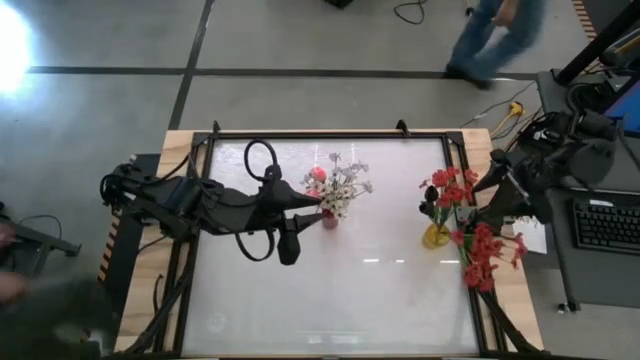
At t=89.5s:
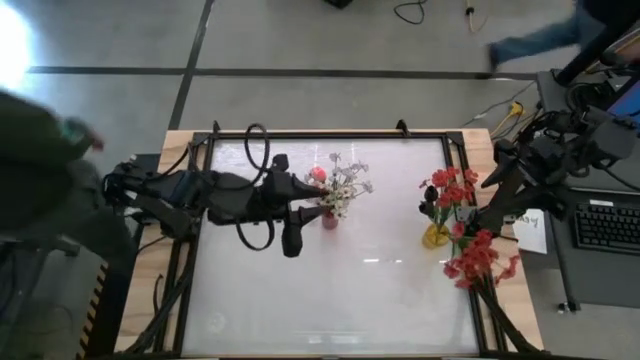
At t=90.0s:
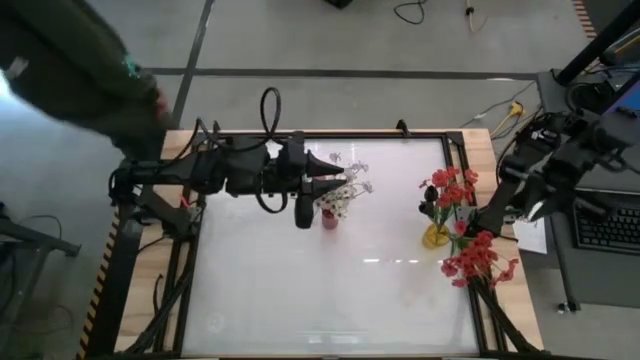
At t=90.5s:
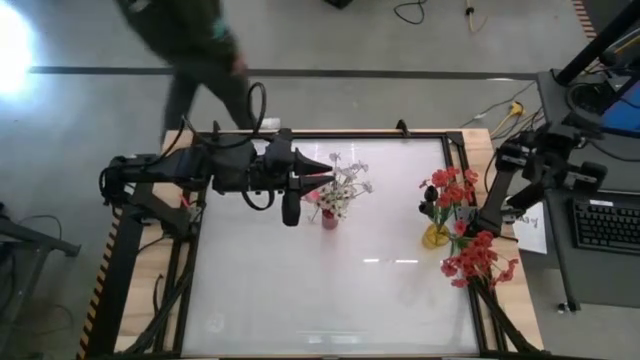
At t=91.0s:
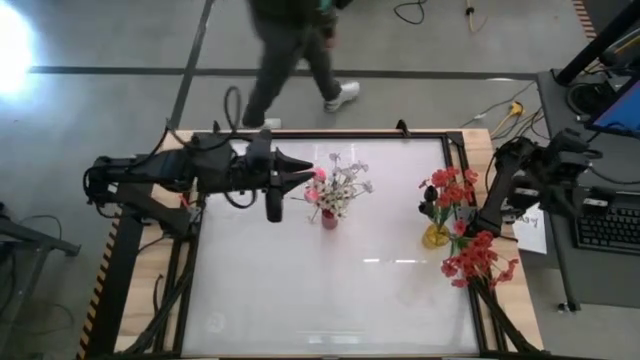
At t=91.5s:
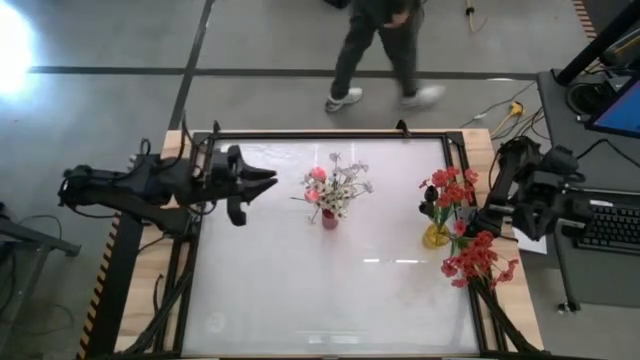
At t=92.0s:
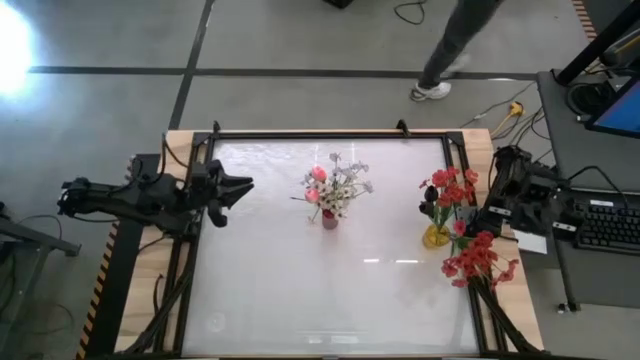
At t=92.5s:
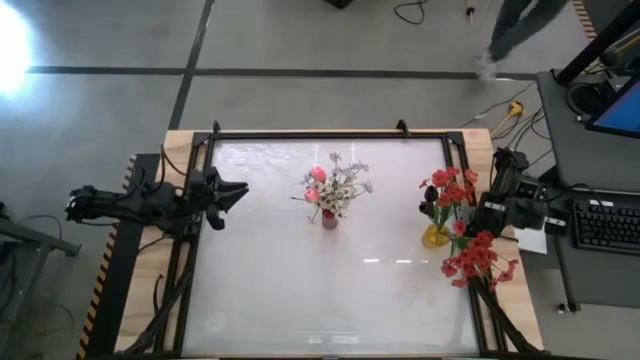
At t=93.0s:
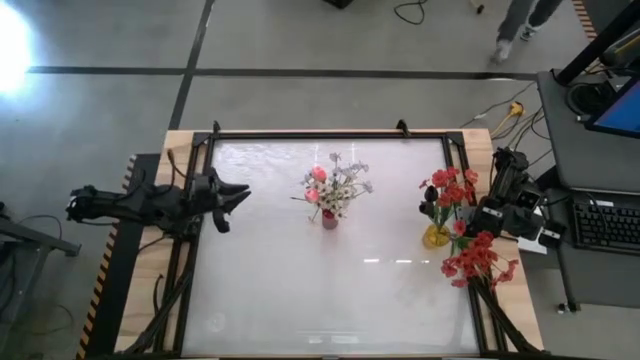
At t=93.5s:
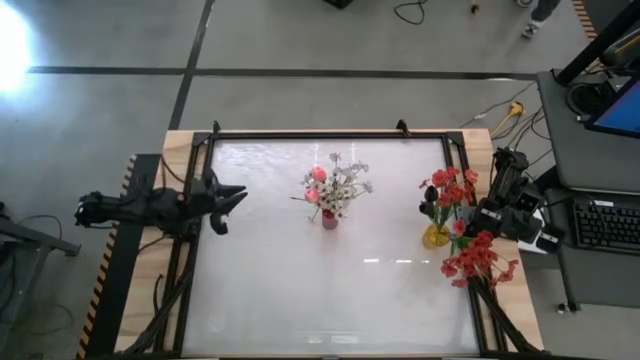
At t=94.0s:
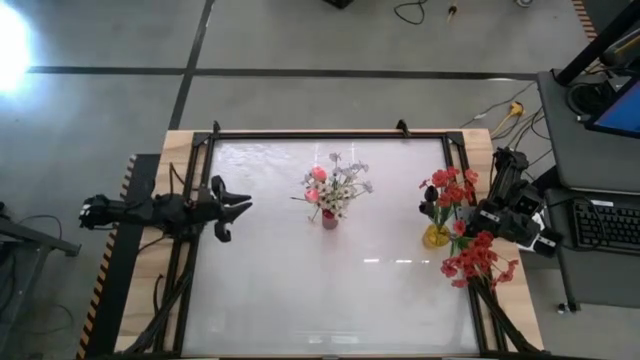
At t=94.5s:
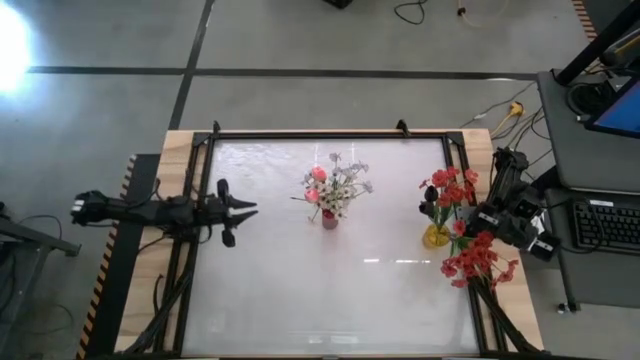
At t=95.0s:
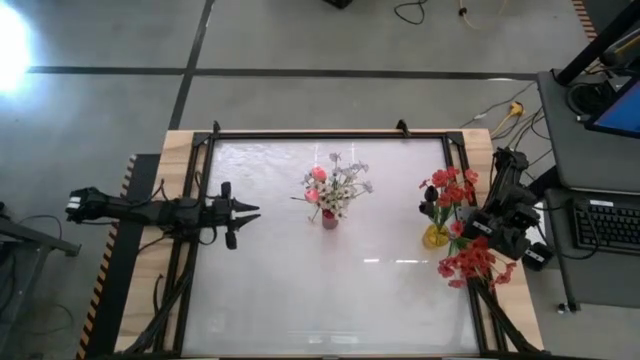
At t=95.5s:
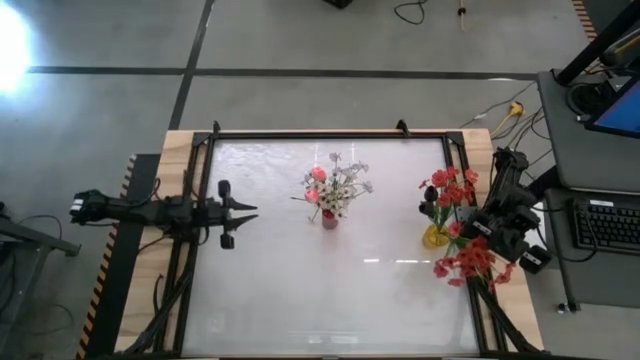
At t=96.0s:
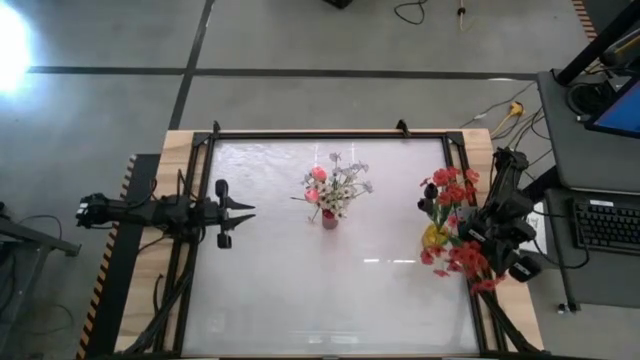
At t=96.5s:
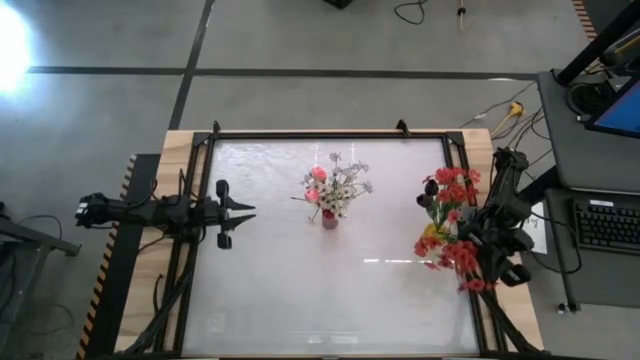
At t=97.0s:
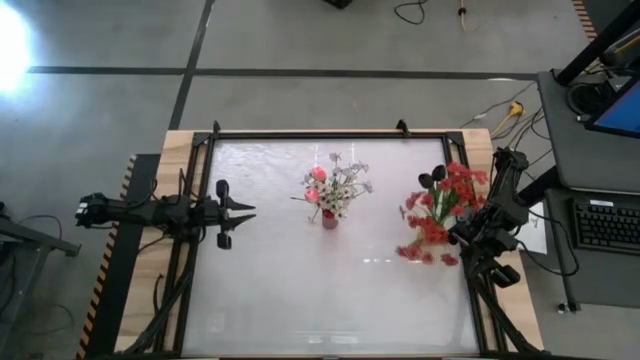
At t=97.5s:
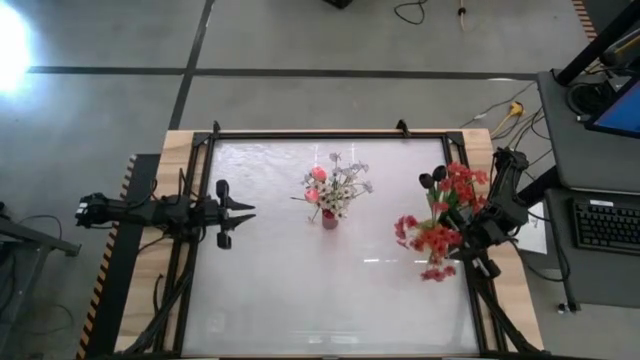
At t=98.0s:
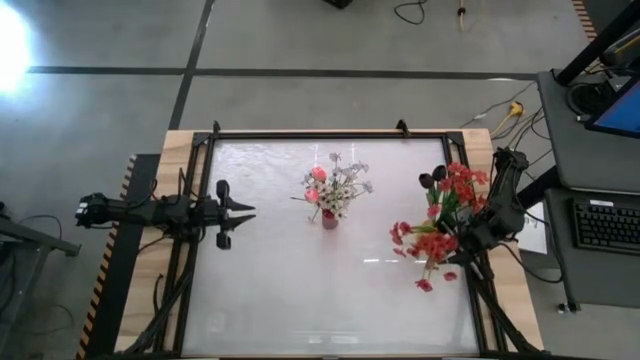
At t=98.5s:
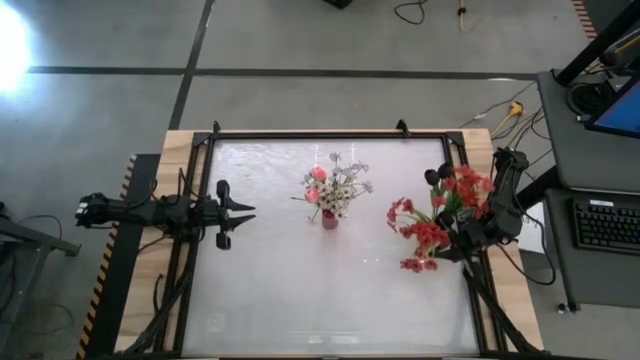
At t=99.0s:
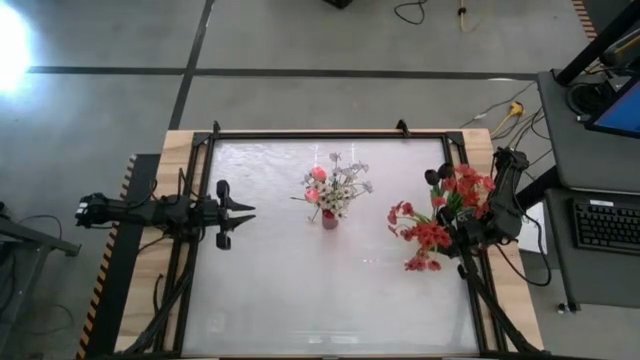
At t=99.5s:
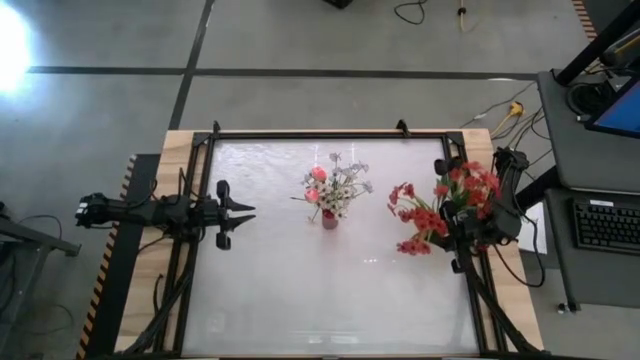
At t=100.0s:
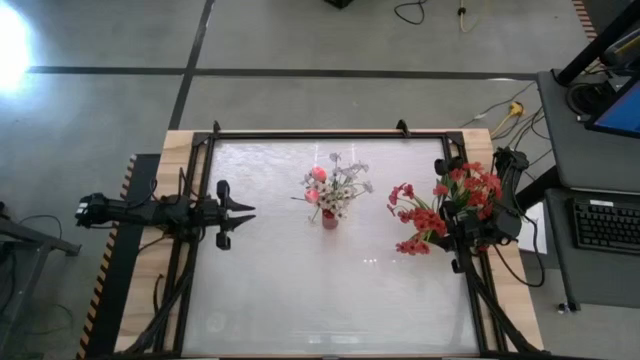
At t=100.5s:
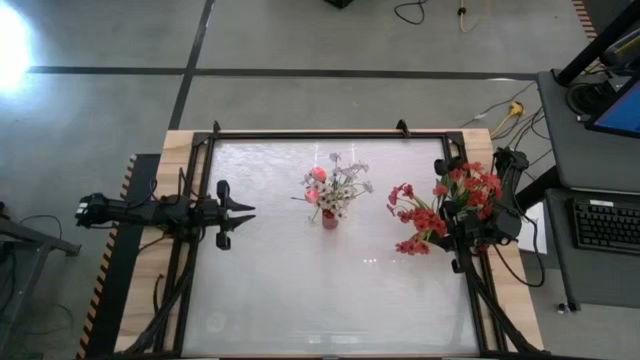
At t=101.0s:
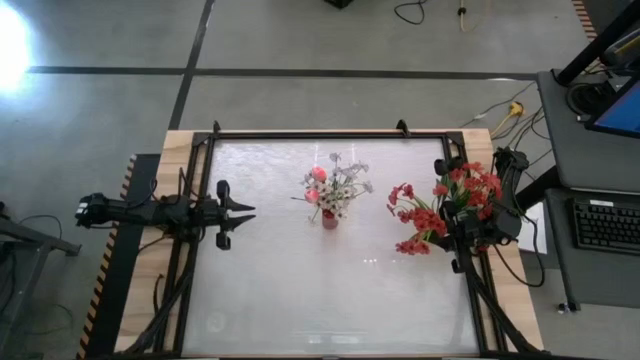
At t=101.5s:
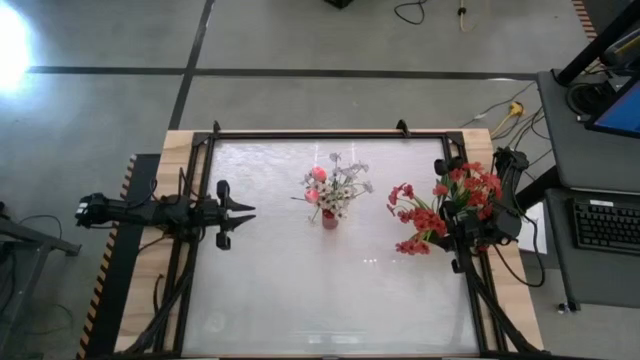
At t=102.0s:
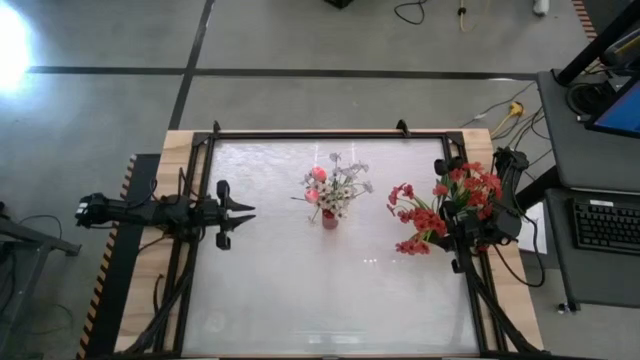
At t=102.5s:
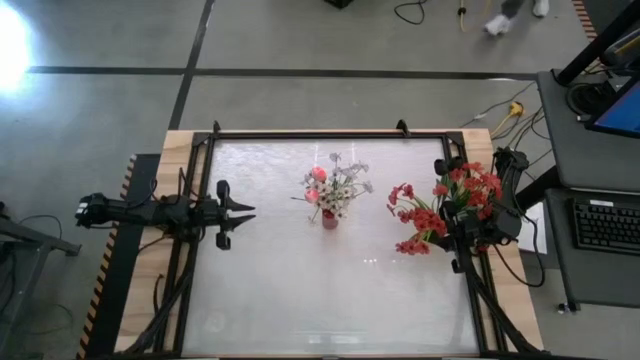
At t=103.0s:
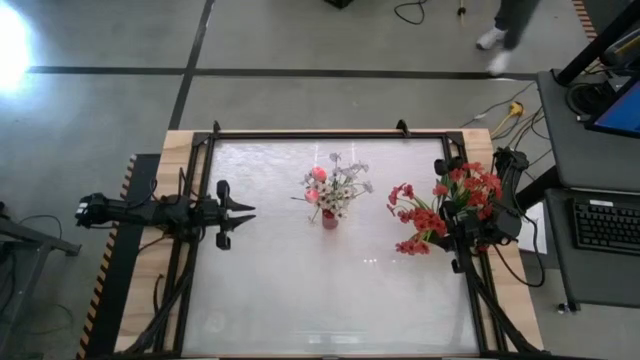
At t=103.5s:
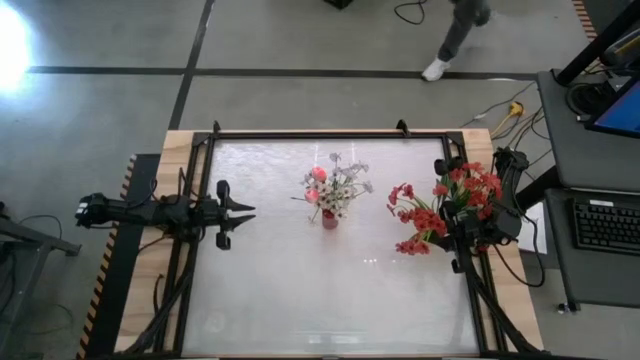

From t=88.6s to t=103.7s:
Task: Sort flowers into vase by color
Return to Home Position

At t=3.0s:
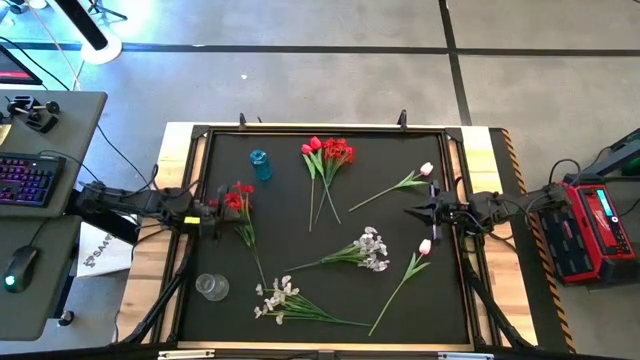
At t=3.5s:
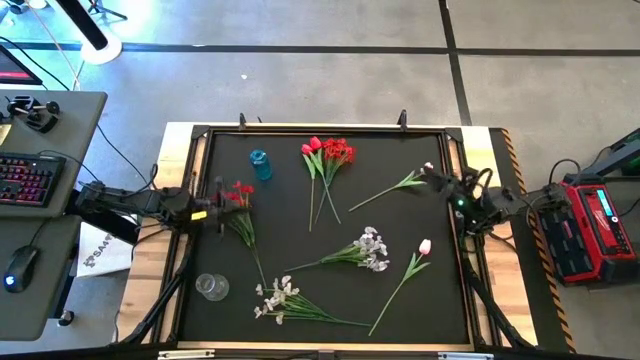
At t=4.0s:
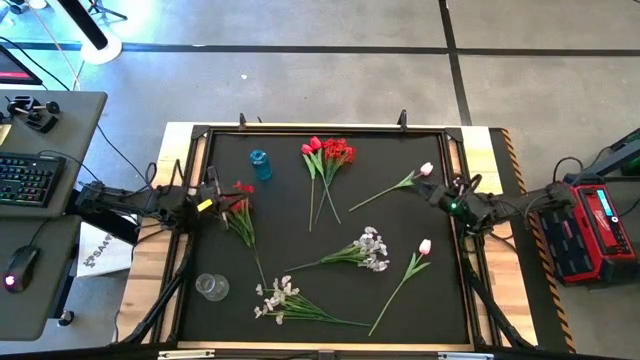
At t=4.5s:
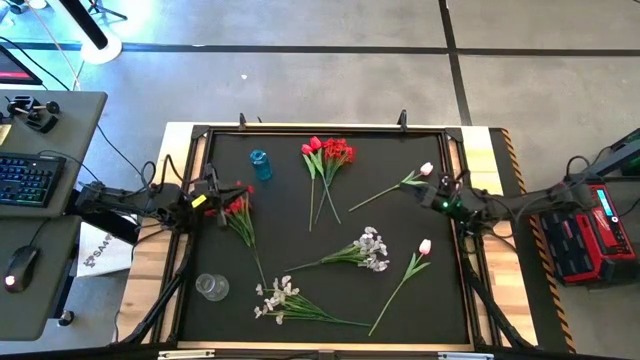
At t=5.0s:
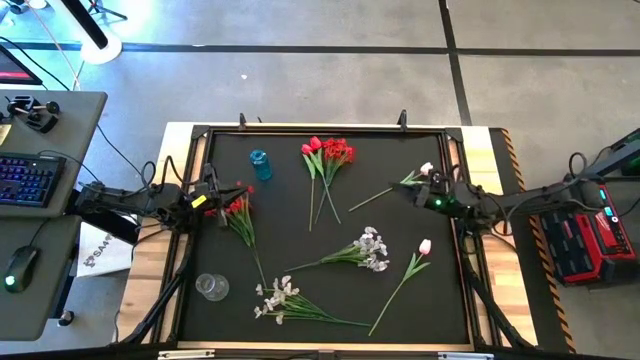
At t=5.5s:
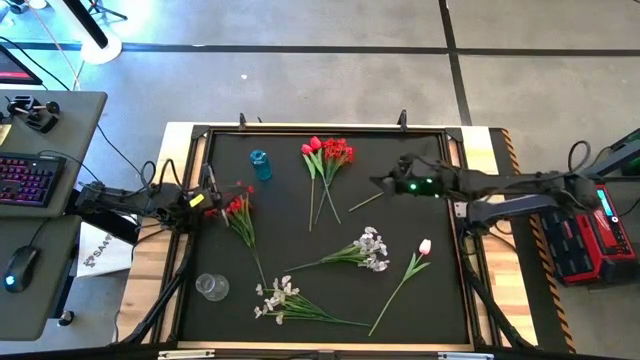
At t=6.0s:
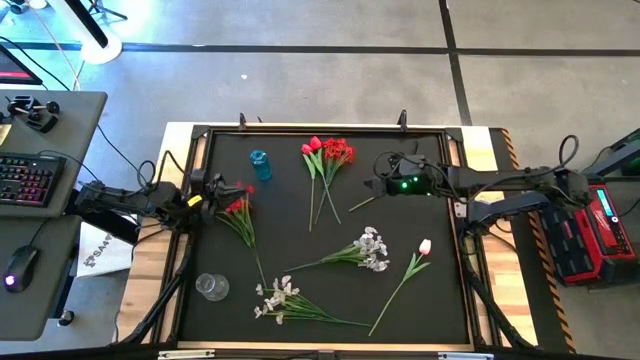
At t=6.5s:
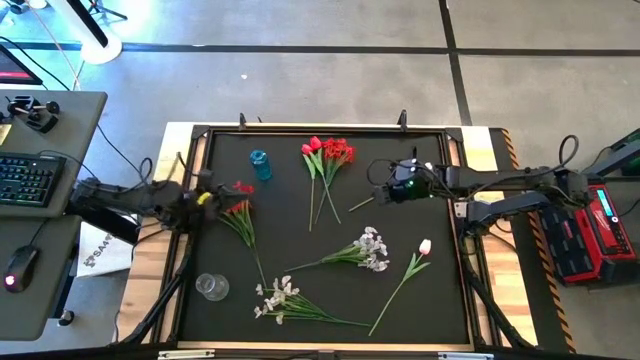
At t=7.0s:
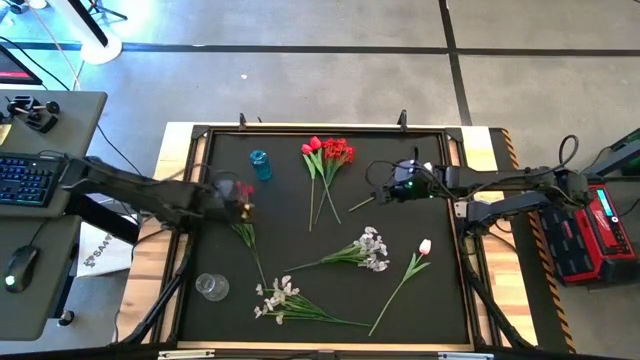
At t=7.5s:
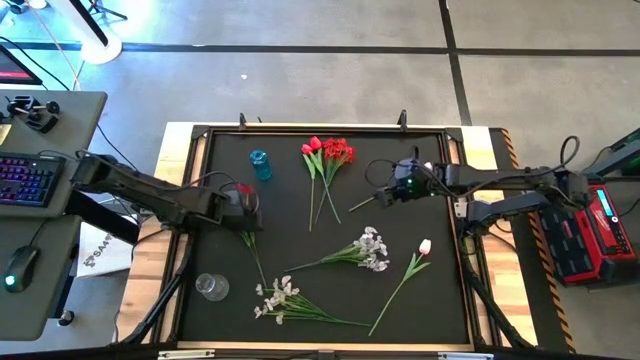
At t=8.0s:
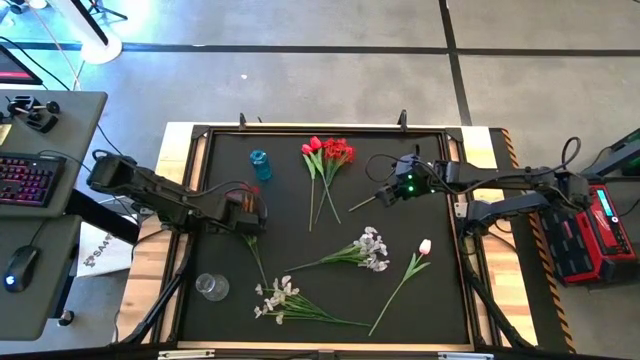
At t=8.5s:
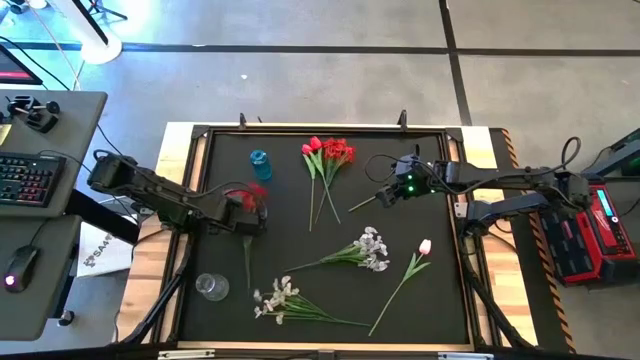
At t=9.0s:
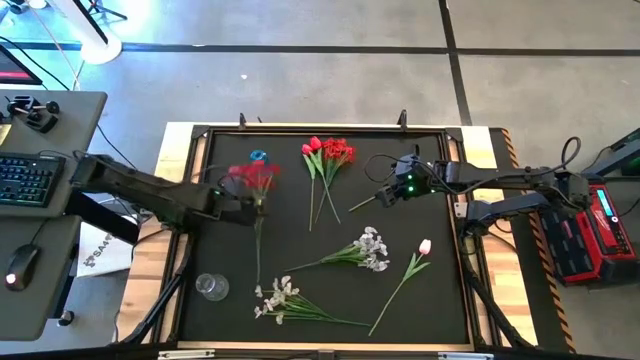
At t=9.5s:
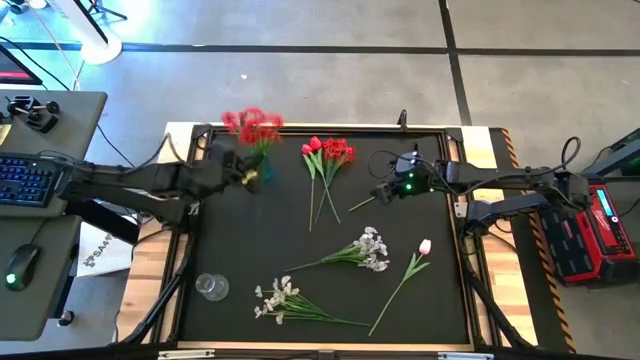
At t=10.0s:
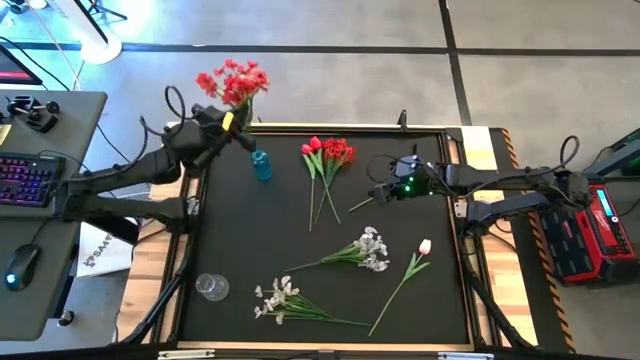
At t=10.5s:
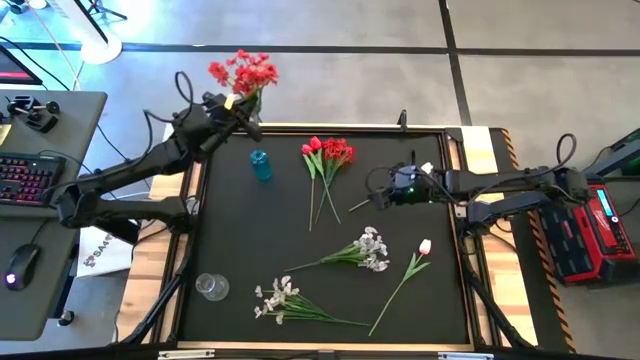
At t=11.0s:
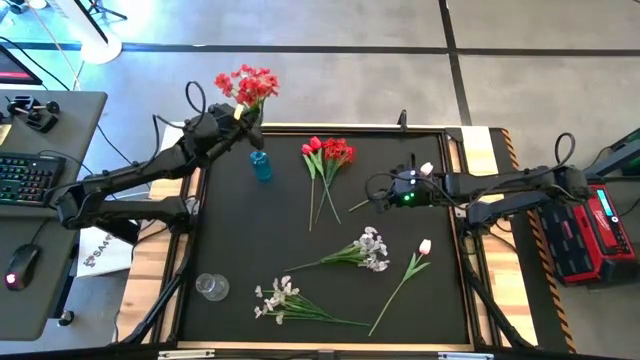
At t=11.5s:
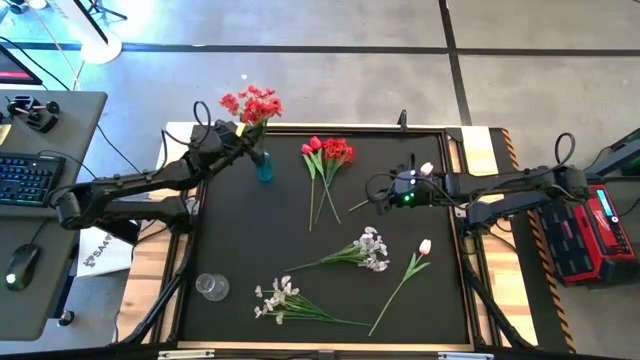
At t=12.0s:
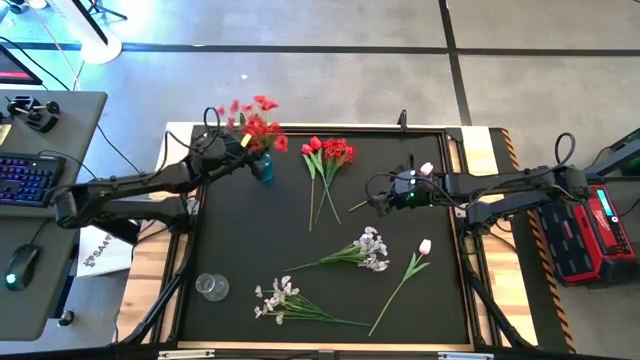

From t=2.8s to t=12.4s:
Task: Sort flowers into vase by color
Put the center left red flower into the blue vase
